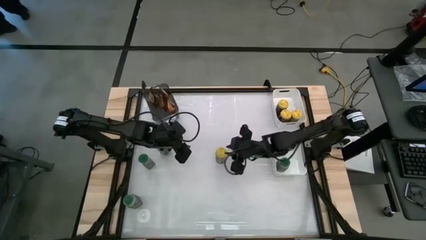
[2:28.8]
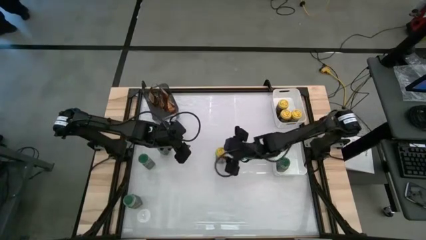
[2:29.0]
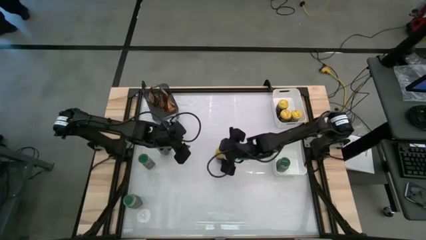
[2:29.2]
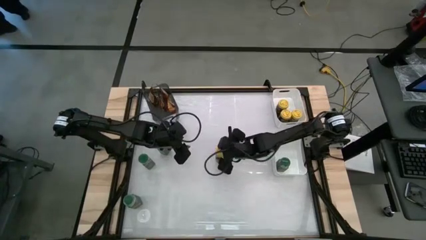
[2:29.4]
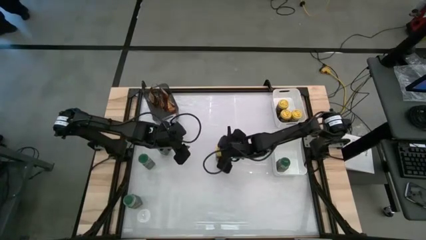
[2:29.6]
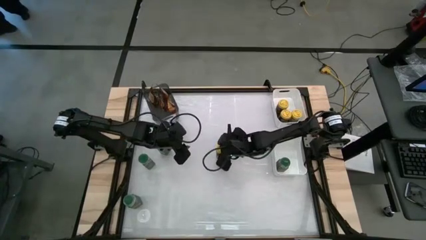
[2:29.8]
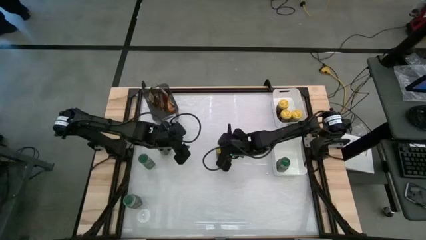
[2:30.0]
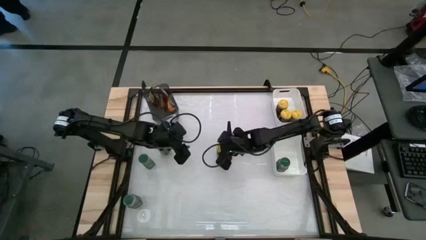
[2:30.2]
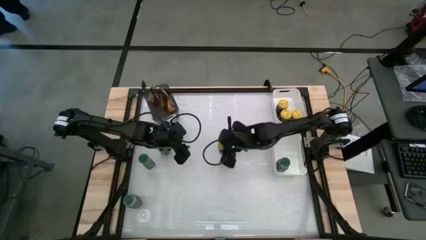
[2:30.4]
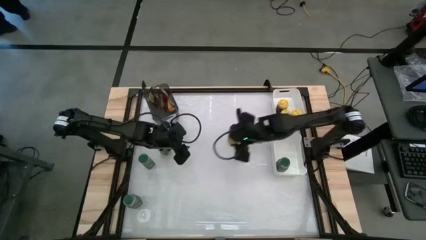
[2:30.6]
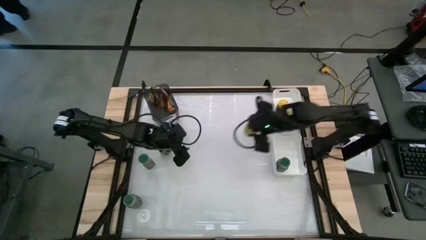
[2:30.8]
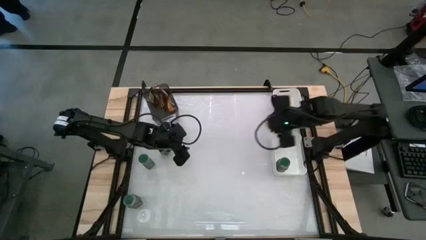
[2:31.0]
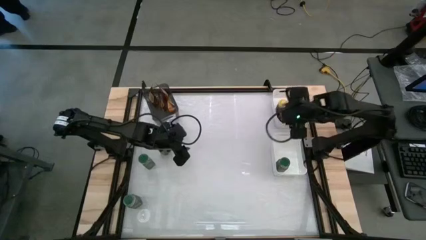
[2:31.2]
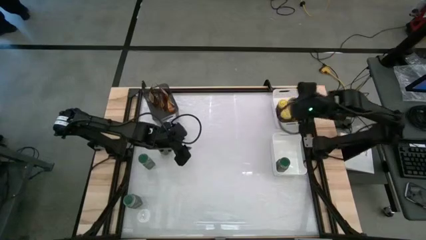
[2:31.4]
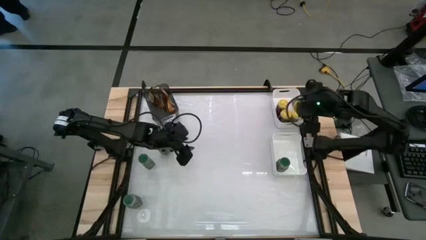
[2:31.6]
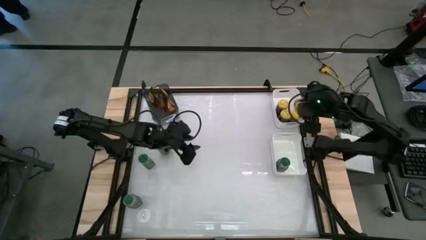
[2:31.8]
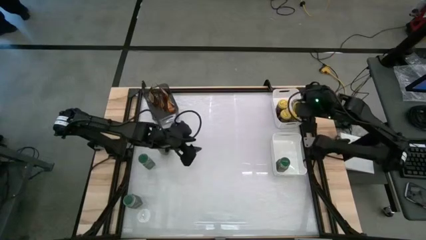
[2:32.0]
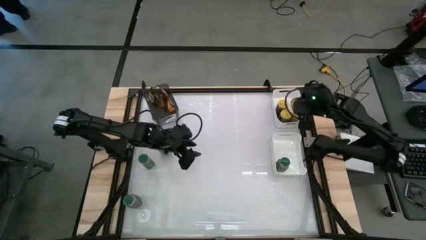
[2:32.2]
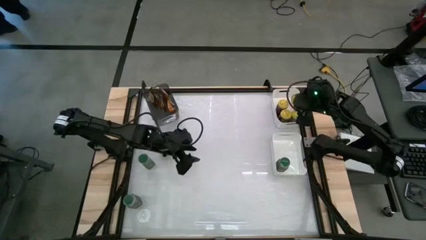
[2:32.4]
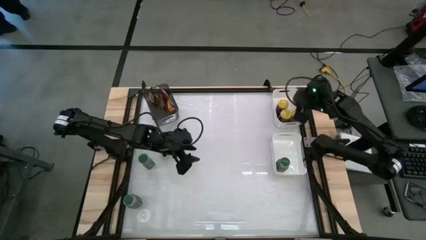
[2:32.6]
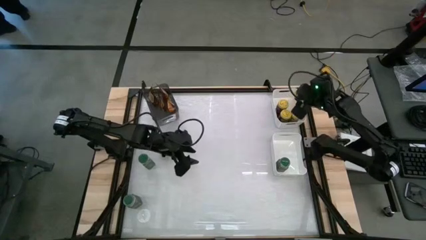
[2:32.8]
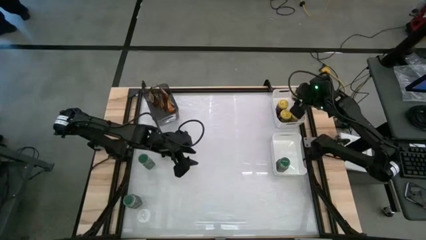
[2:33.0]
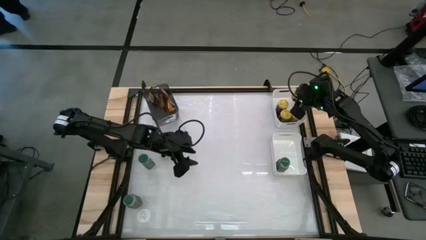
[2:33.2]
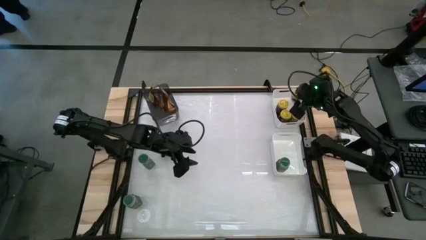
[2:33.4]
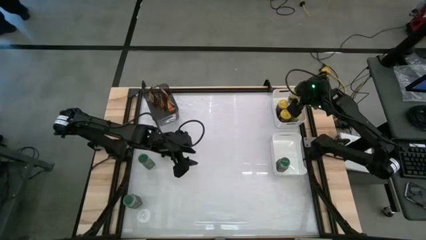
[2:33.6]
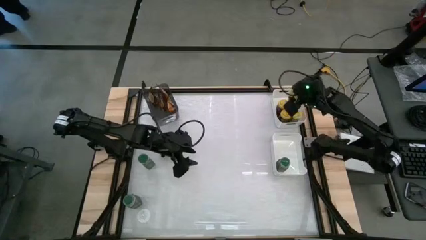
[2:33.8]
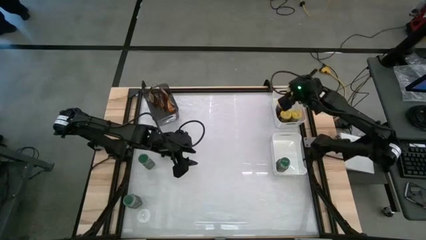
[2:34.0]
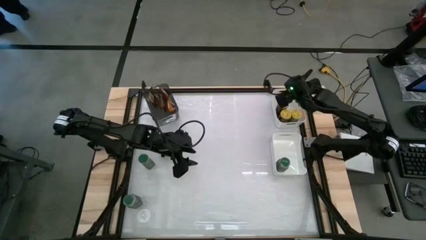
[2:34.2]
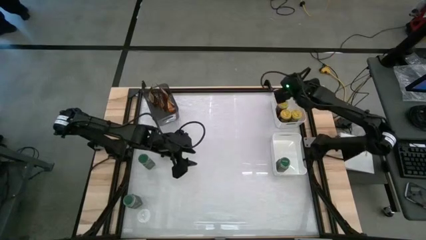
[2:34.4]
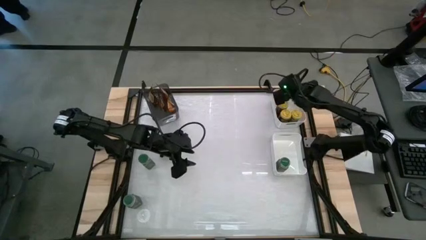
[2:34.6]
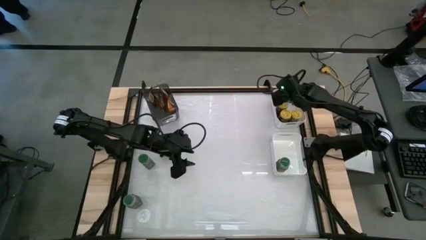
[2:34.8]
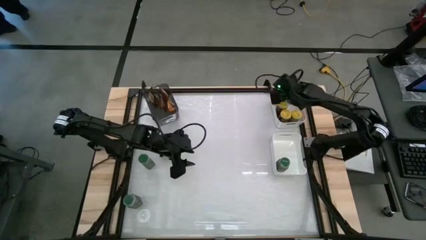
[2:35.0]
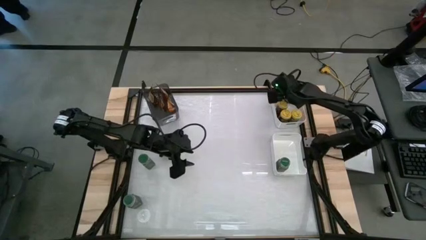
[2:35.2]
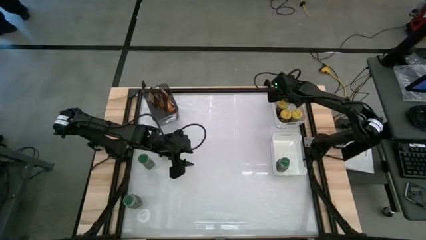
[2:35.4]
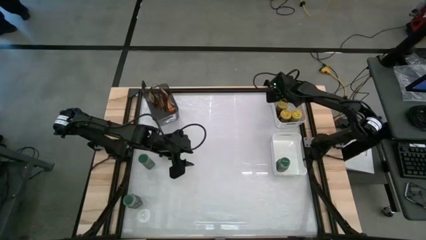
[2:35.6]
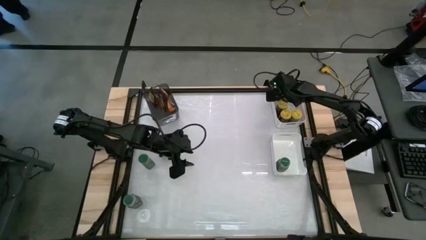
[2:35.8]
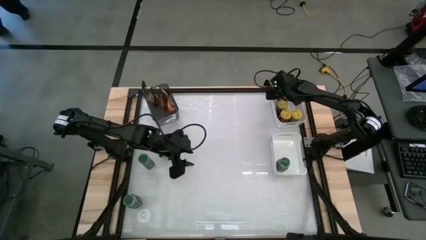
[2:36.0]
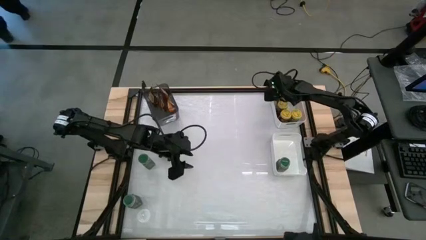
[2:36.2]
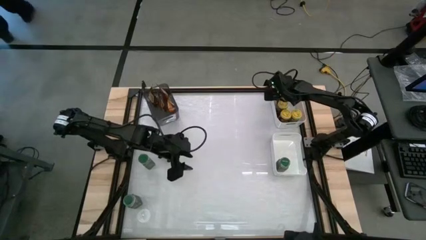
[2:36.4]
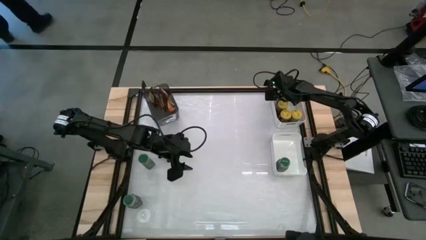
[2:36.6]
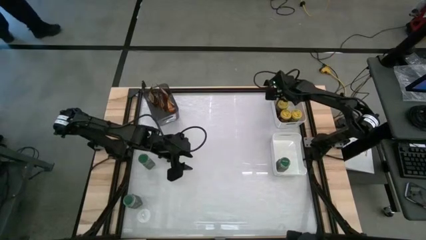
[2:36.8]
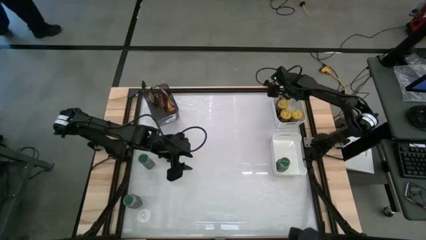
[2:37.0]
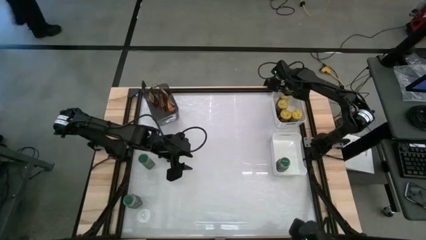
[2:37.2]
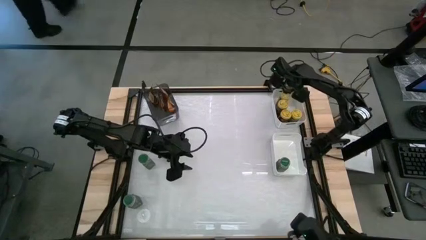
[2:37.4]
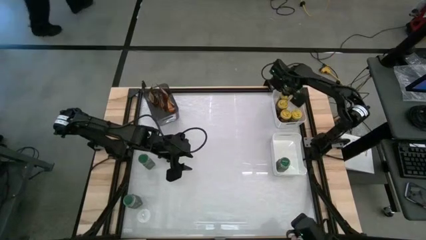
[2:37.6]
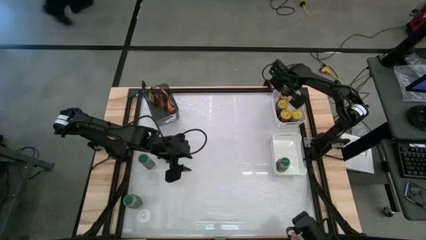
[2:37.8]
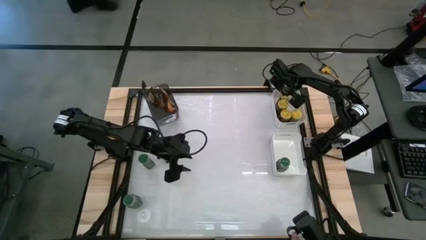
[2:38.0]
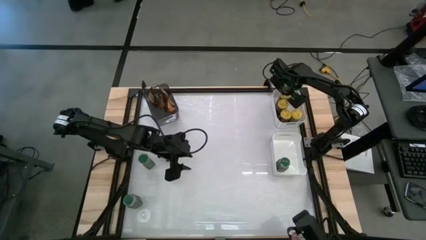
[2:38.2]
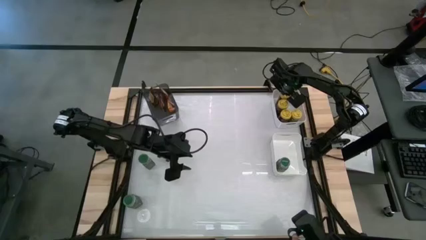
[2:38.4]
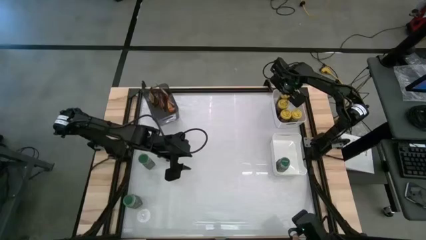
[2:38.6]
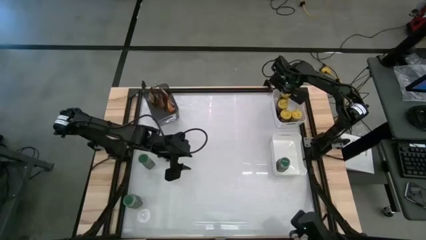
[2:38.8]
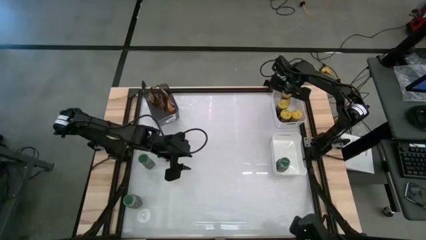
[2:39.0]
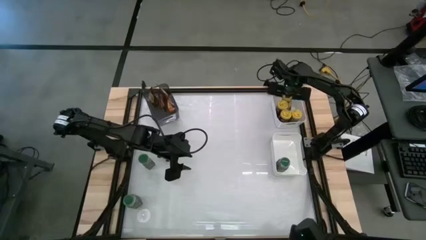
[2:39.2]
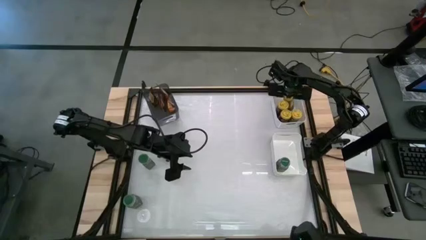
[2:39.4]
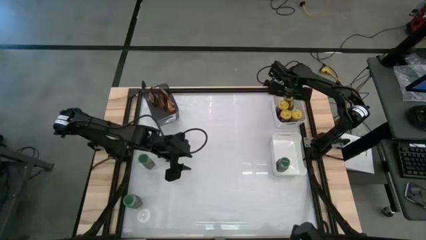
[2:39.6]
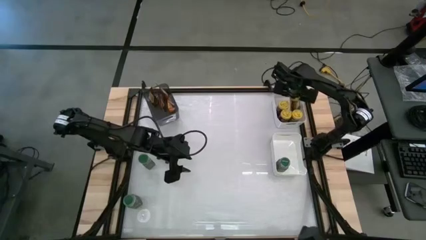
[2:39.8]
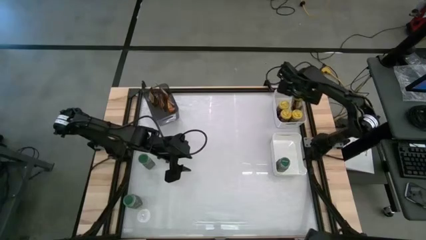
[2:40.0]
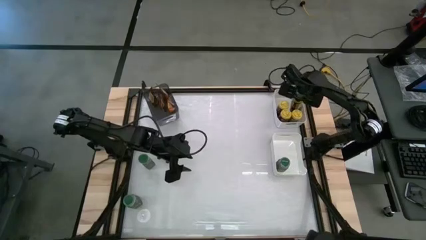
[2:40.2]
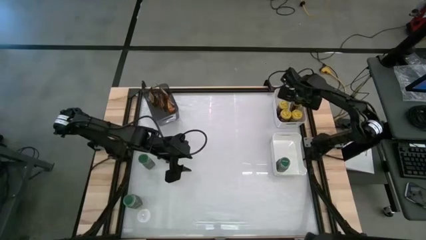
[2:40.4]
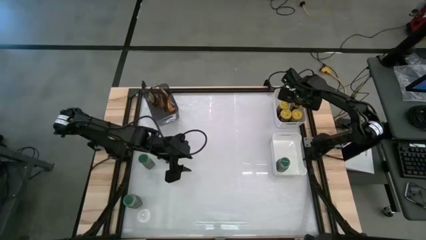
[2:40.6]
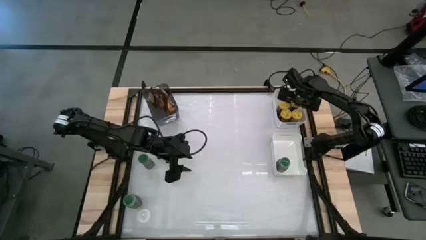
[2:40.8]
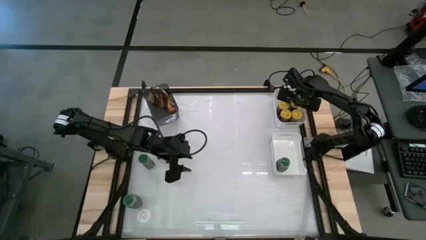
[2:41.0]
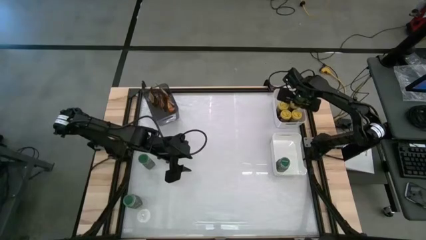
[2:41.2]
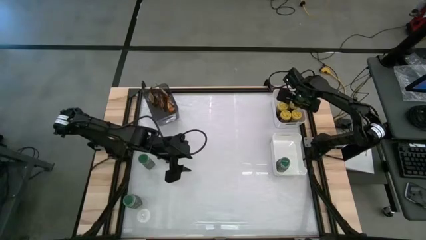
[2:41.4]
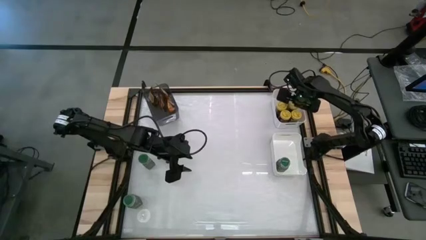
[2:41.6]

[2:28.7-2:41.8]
Task: Sort spices by type
Put the yellow seasoning bottle into the top white bin

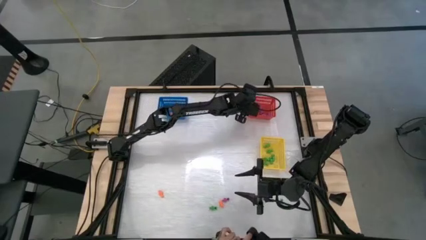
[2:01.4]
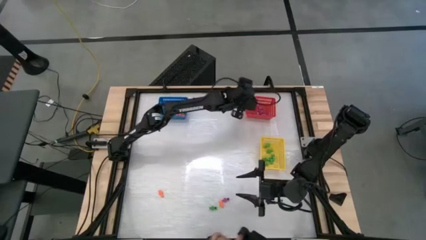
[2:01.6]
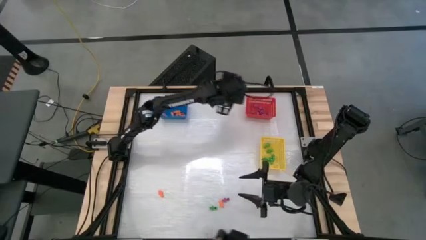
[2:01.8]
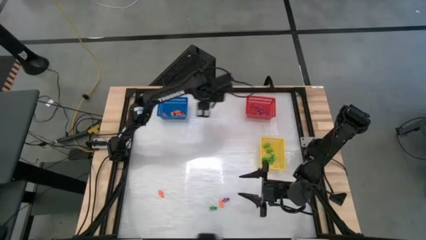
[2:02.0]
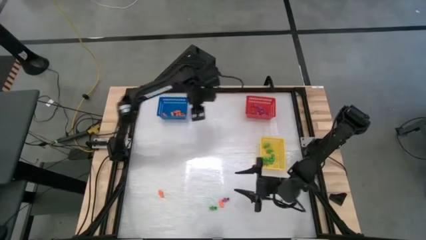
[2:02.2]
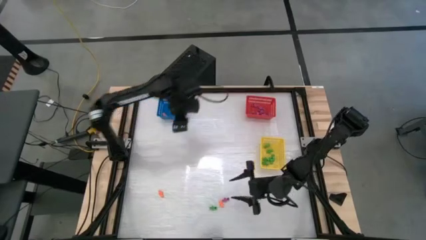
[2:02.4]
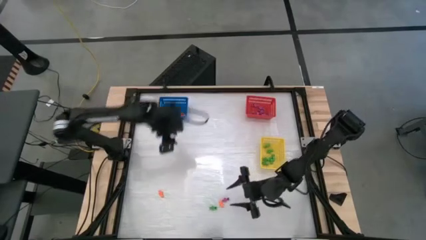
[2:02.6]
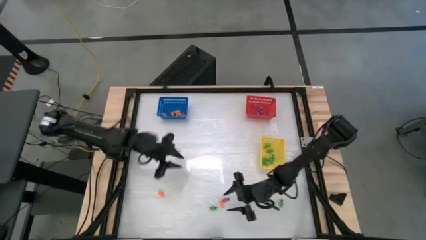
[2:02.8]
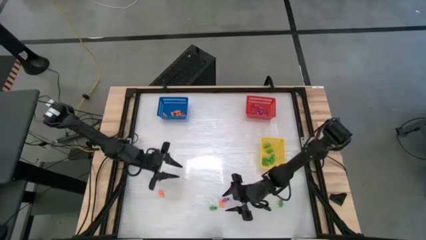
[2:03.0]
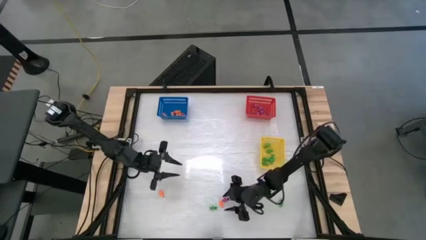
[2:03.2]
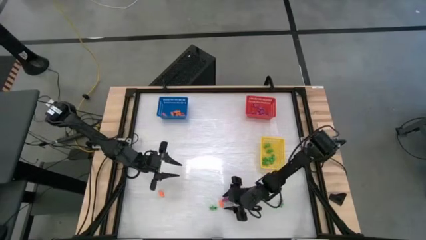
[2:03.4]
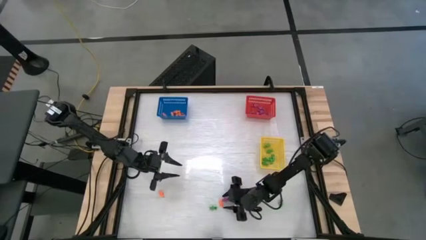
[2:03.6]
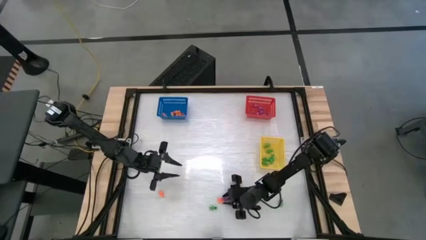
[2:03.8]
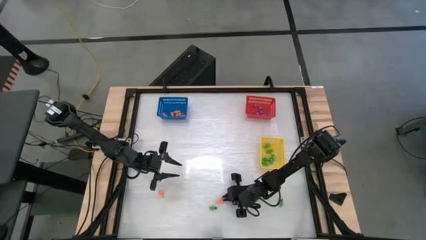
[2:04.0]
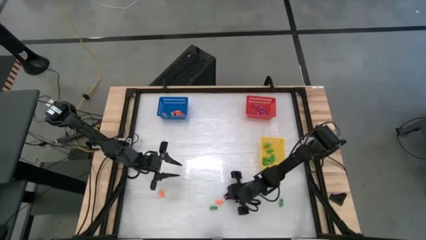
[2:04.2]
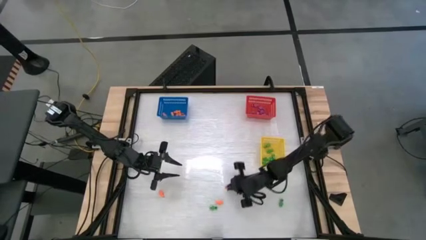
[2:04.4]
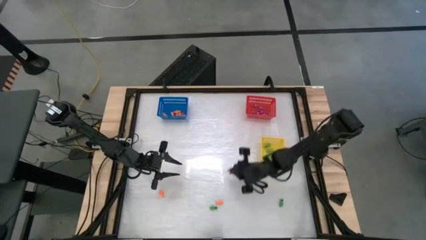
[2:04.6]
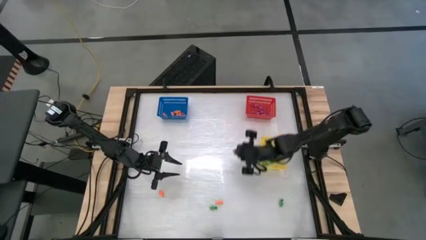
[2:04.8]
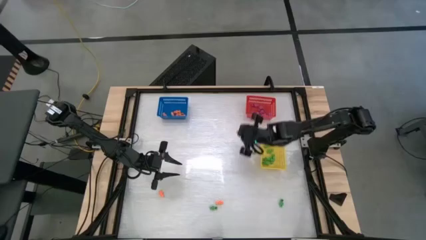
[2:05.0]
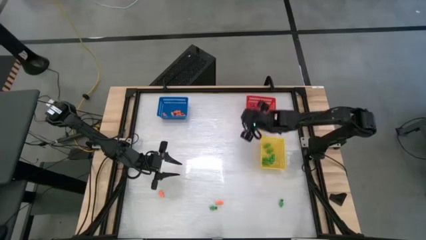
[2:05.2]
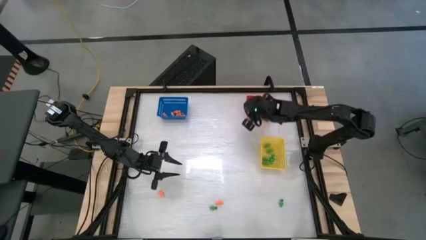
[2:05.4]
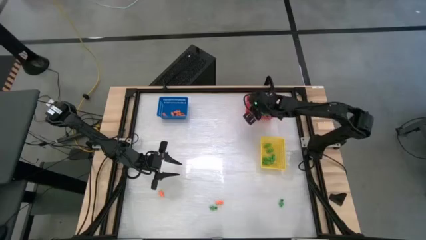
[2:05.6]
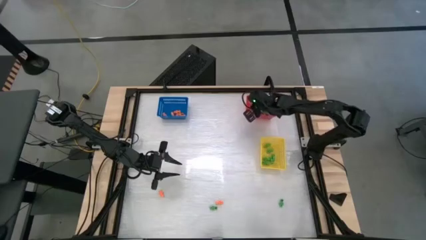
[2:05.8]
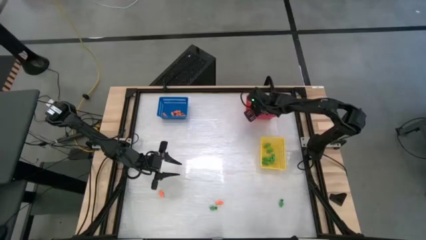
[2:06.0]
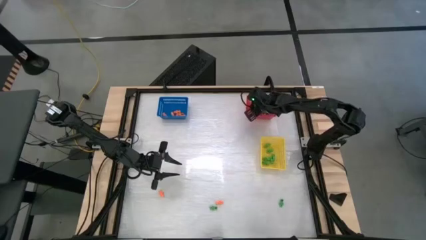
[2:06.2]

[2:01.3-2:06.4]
Task: Sort Halloween decoration
Put the purple skeleton toy into the red bin
